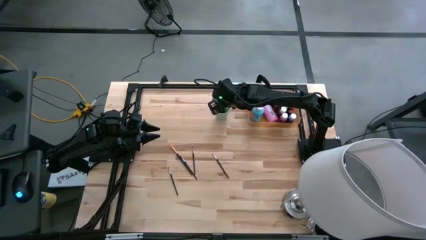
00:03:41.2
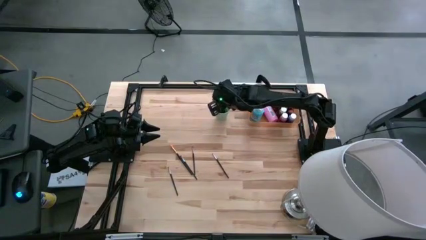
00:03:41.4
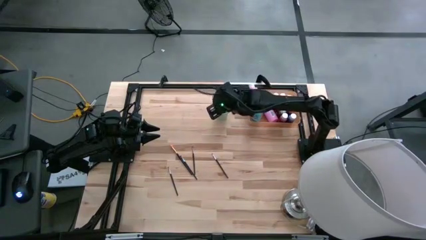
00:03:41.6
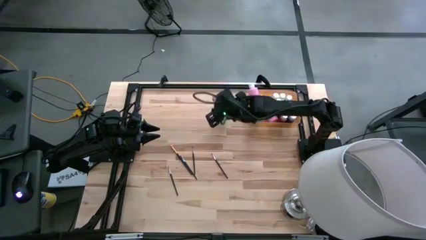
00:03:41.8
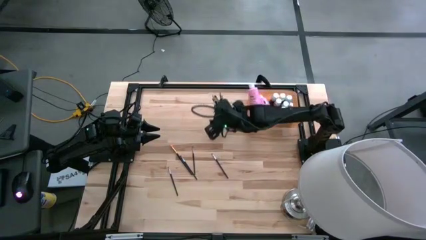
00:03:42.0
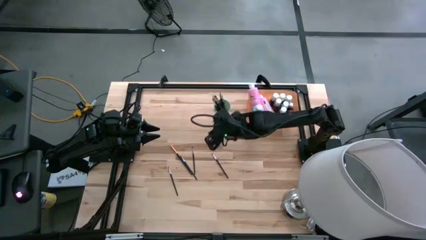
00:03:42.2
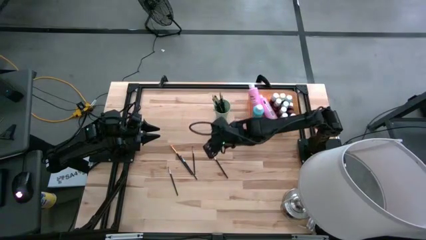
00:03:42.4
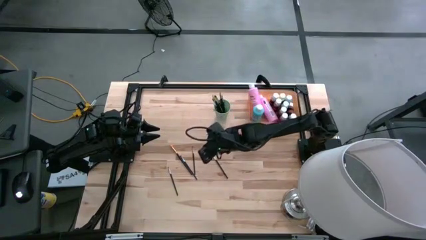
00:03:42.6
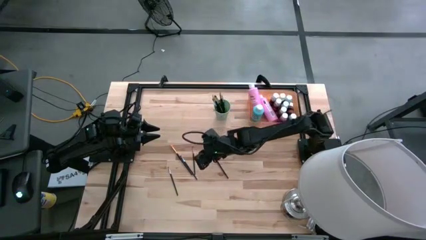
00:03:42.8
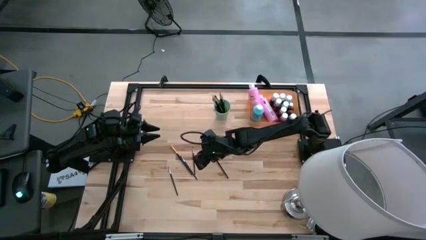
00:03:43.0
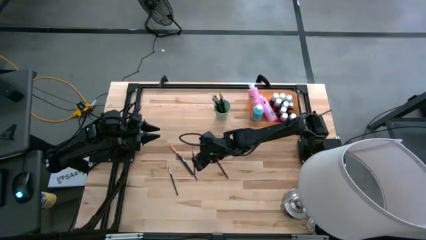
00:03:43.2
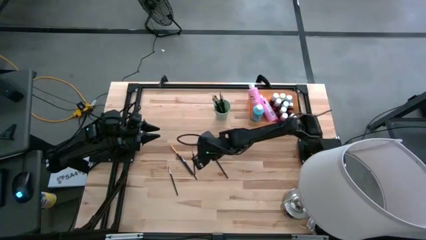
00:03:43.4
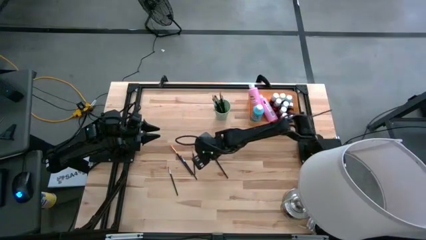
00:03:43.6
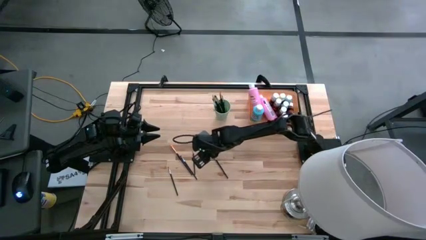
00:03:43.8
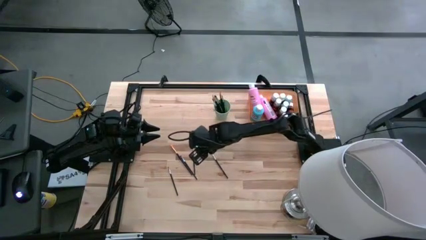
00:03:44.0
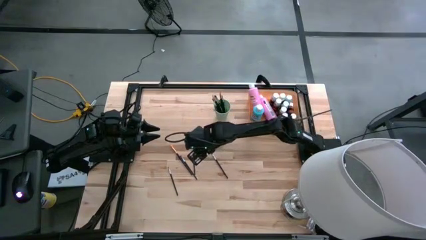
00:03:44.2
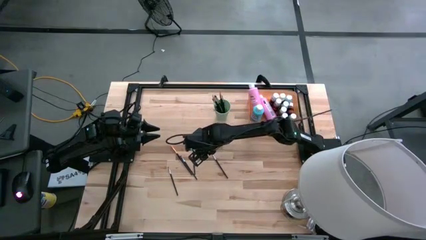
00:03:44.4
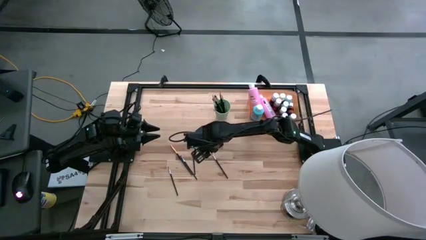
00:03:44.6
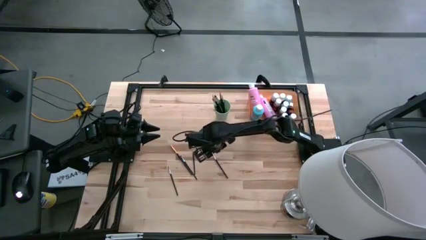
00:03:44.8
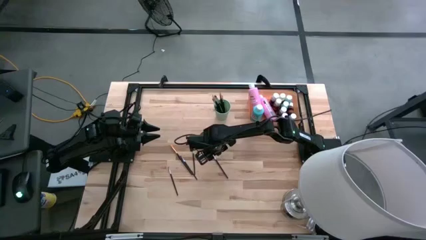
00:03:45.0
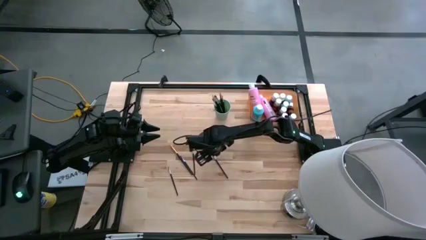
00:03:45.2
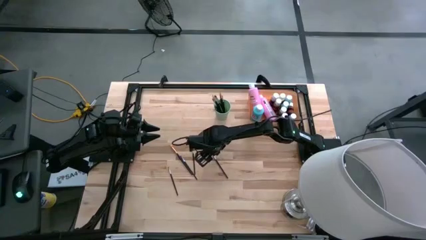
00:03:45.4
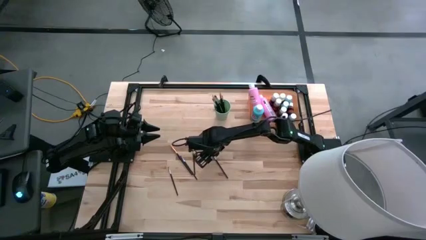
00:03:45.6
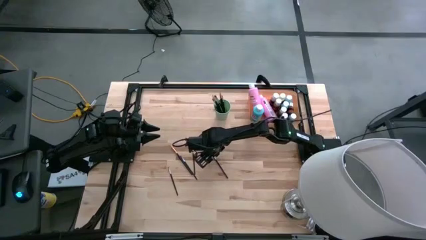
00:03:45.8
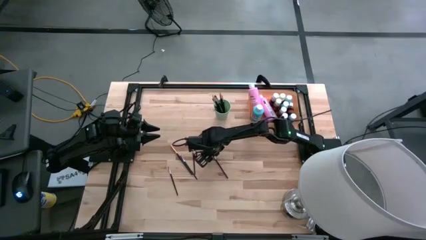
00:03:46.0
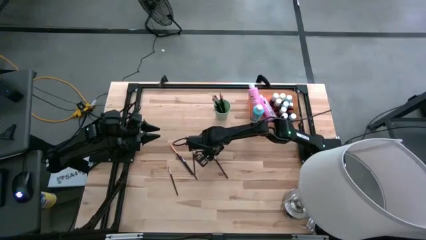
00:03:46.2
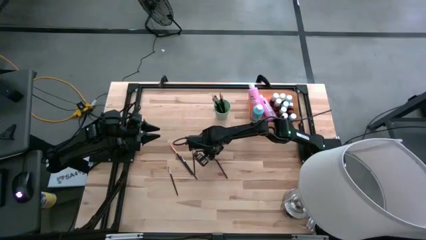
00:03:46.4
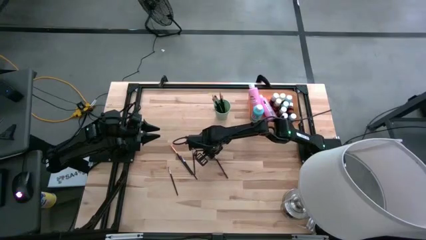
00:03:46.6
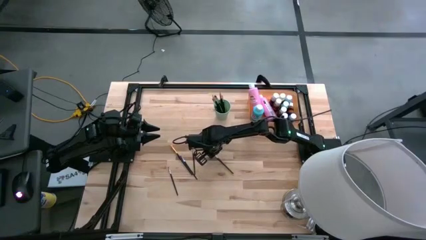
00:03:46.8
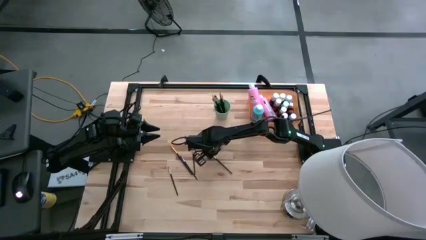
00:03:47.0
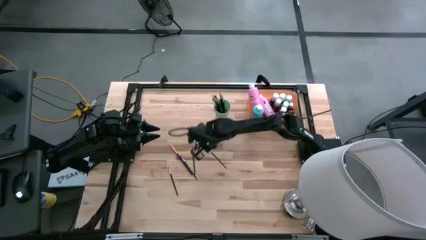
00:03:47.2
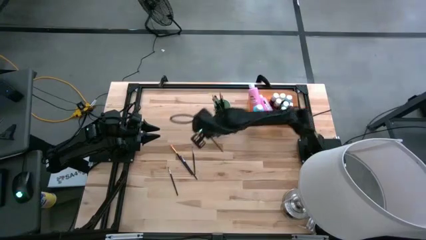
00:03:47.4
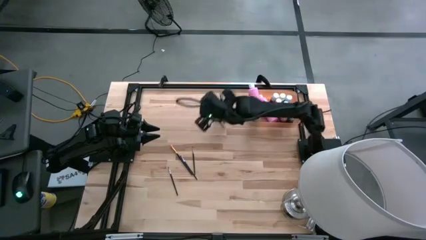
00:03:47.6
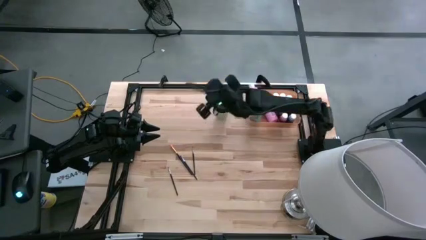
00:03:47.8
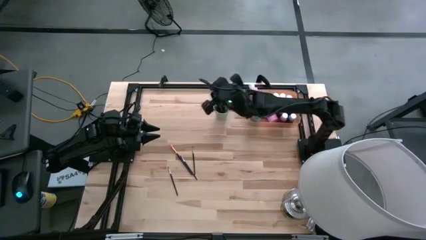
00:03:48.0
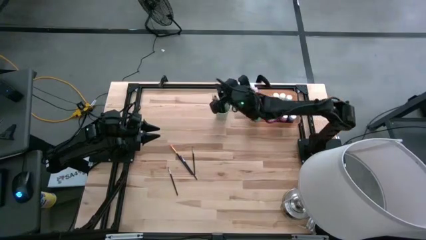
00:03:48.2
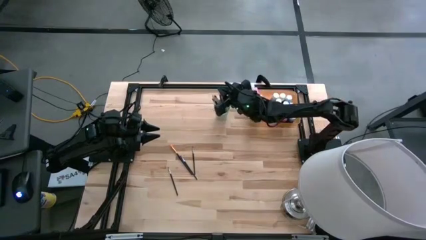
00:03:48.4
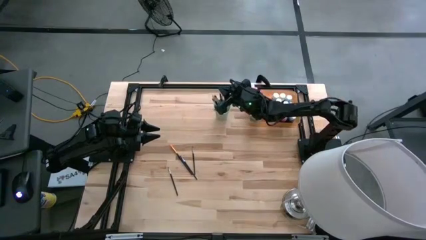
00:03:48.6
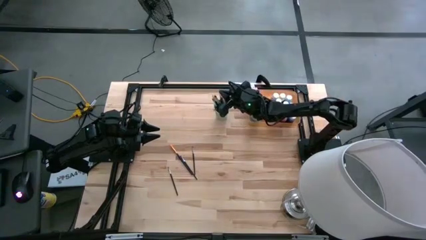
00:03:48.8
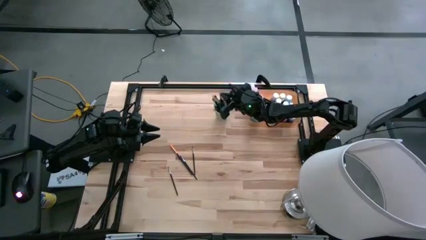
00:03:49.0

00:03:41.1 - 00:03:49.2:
Task: Pick & Place Paint Supplies
Put the silver paintbrush into the green cup

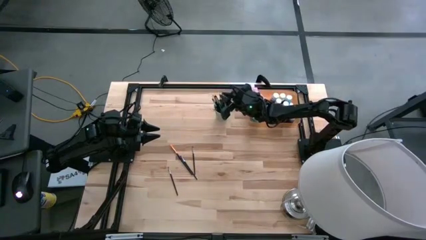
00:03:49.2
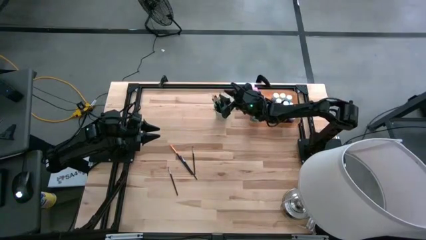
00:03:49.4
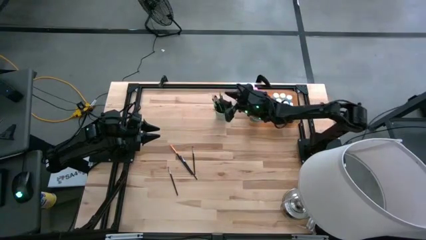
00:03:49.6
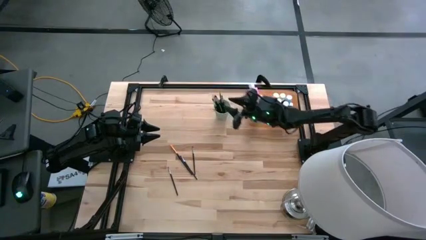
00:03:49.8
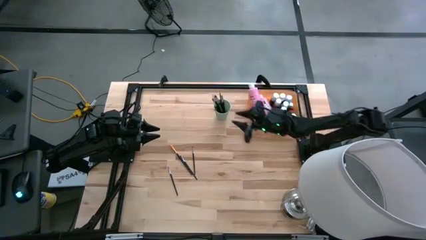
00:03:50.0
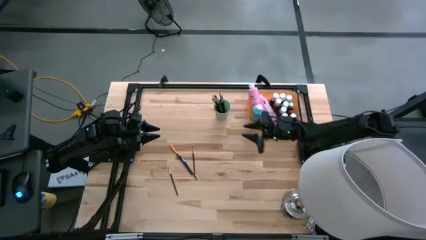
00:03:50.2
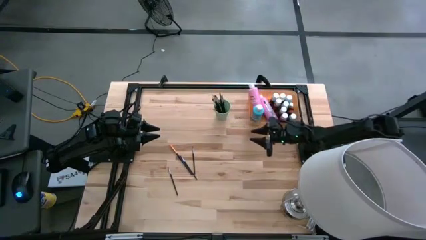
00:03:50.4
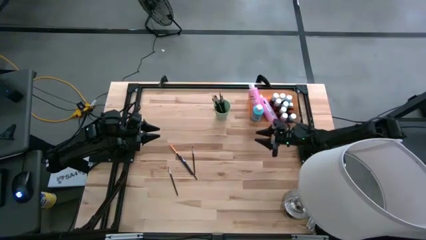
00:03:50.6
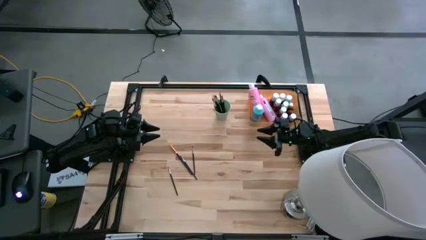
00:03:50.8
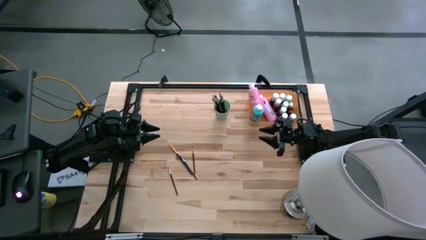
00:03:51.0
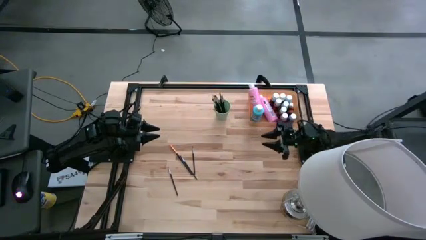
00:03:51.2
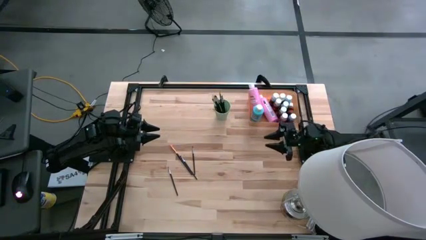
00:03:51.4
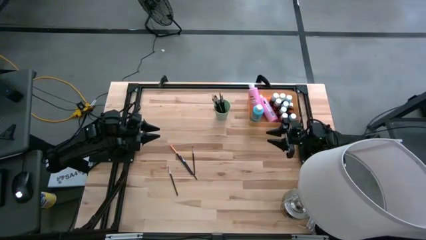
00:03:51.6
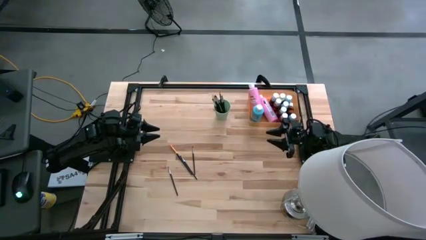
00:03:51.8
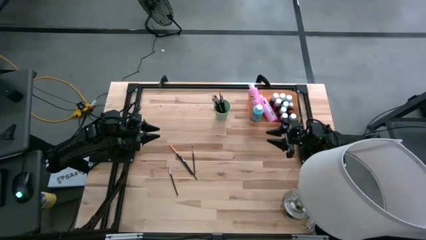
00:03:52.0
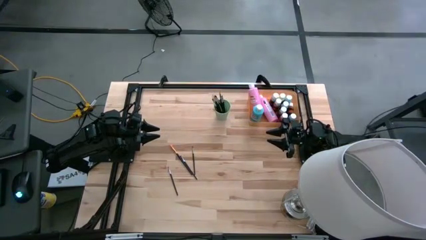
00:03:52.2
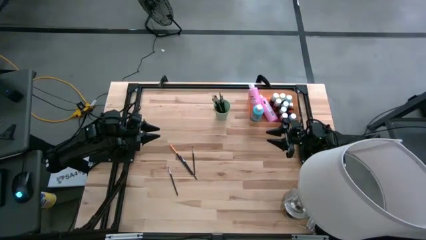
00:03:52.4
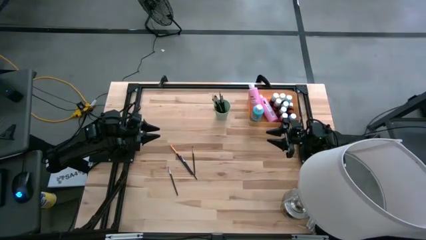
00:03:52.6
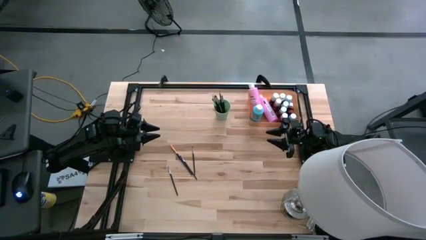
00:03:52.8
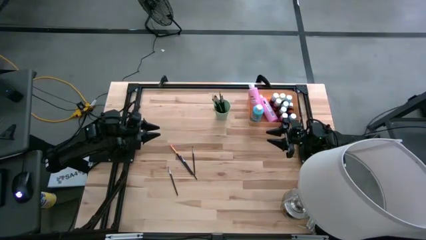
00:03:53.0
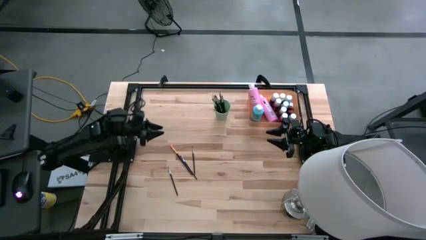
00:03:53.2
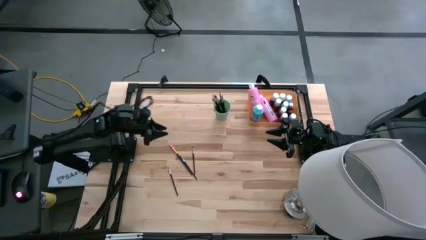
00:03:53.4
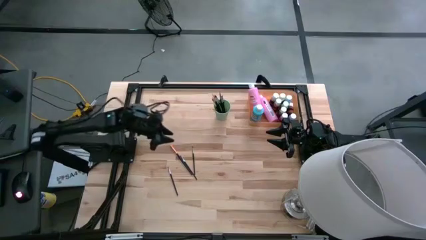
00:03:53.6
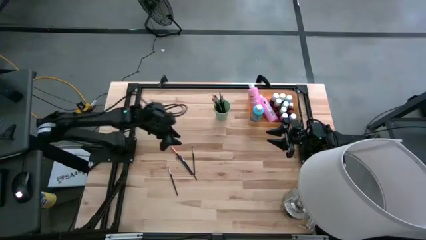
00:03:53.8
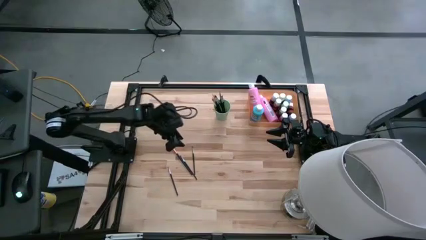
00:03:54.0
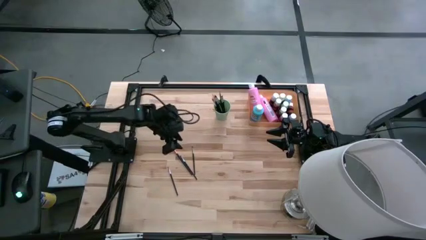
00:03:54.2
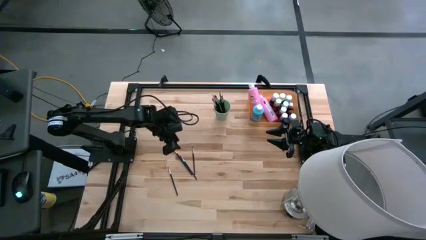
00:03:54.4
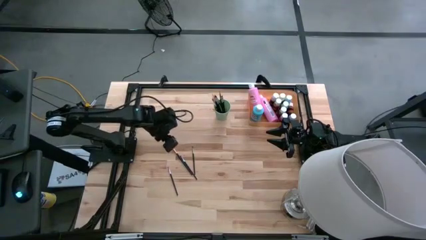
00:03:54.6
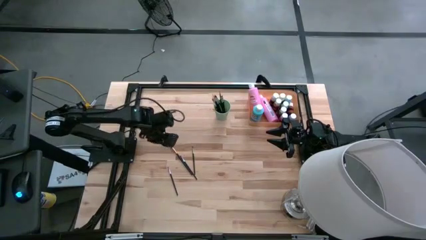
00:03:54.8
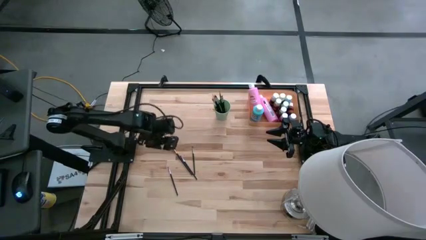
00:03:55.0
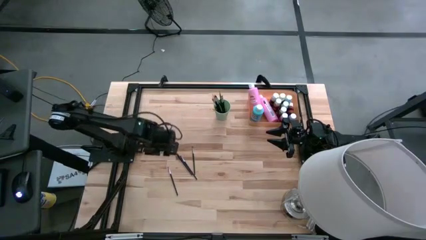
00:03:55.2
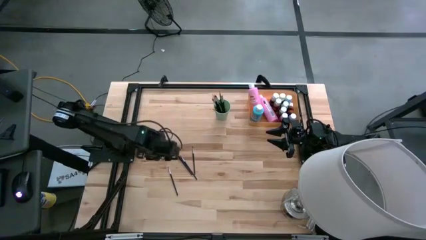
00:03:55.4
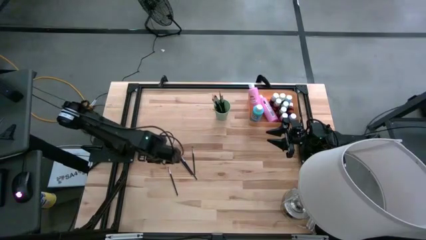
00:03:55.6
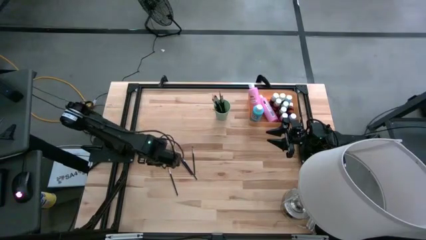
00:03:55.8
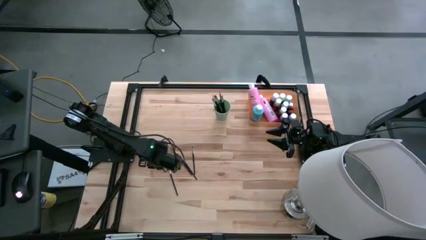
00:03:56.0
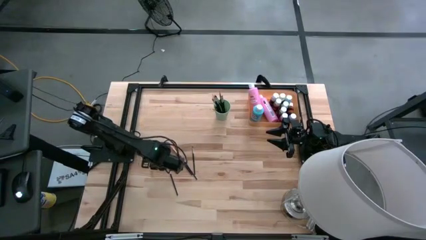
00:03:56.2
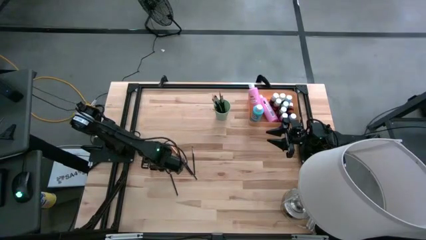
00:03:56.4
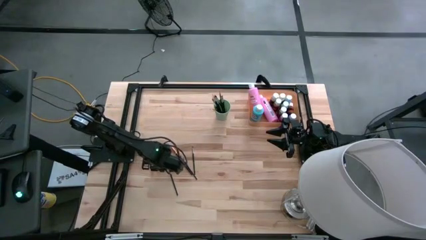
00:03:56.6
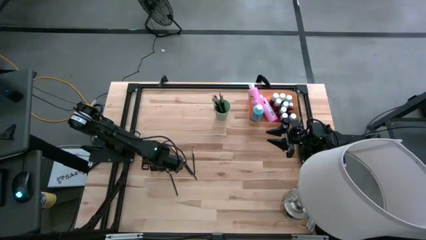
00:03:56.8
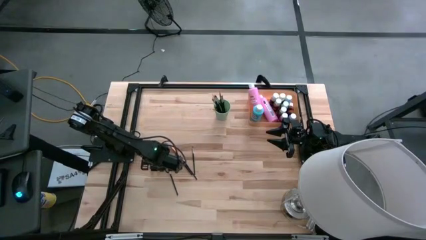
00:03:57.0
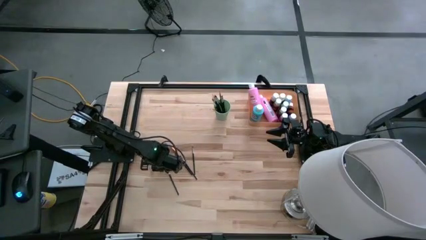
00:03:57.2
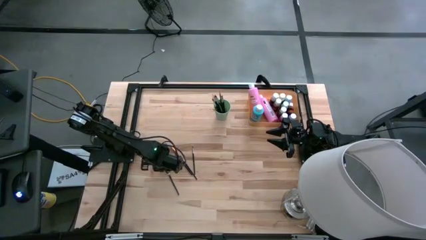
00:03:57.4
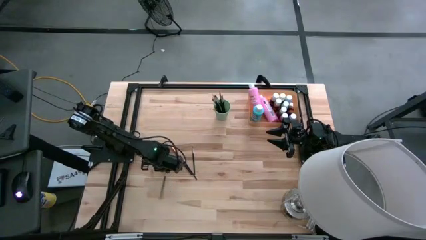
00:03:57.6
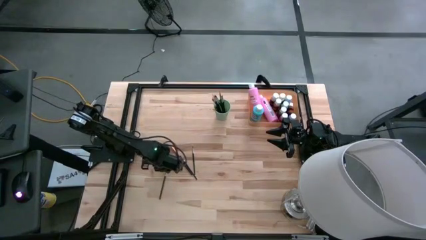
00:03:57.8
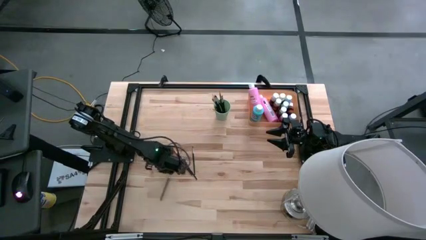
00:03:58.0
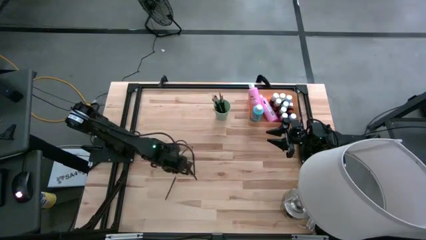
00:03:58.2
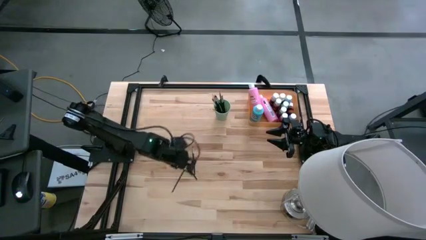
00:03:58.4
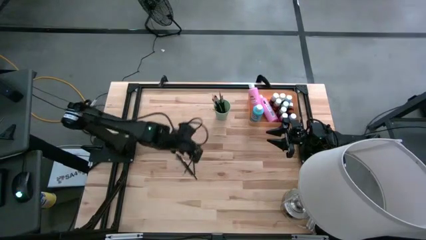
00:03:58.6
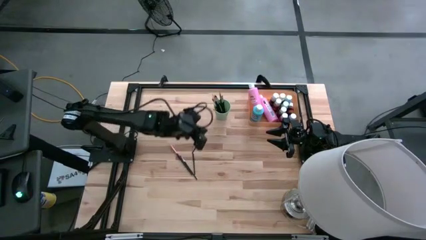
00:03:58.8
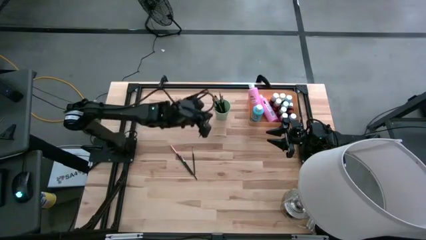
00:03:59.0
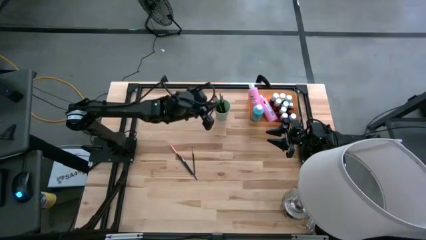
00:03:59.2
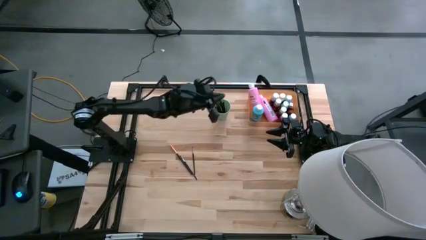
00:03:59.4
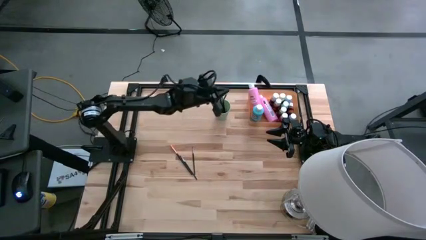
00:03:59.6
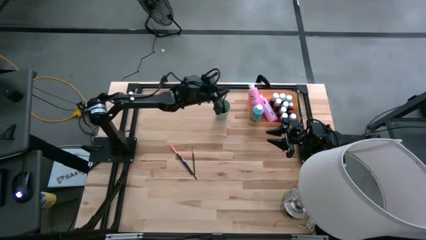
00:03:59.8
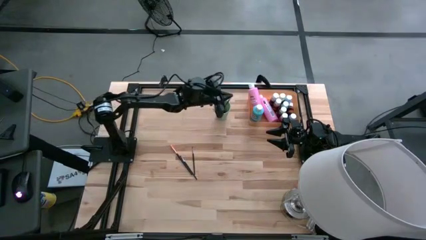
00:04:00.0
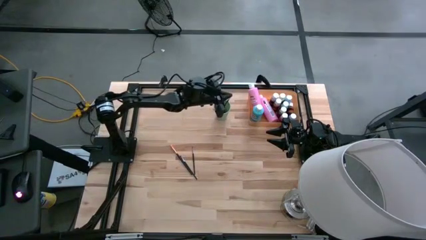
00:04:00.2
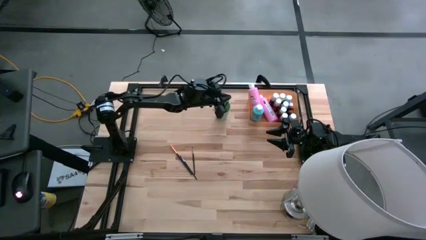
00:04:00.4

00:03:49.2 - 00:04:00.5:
Put the bottom silver paintbrush into the green cup
